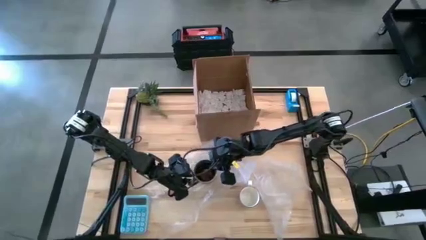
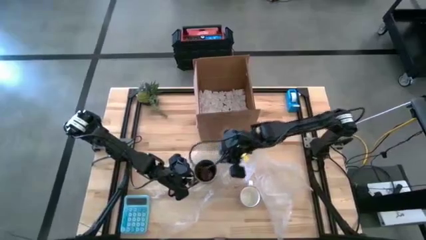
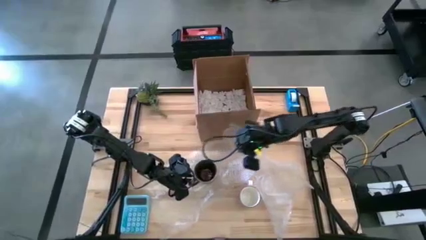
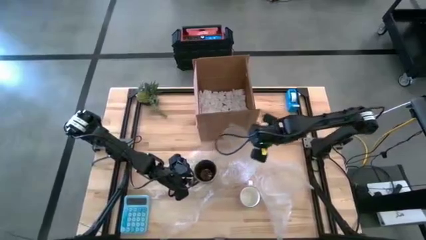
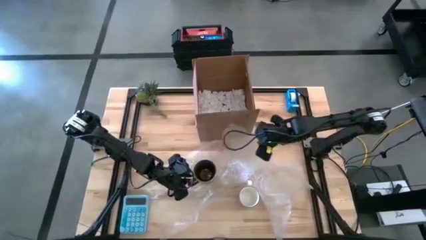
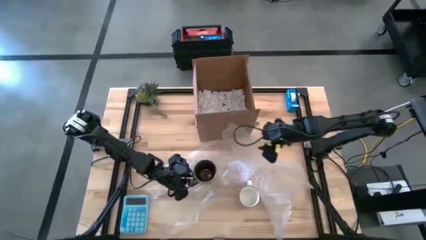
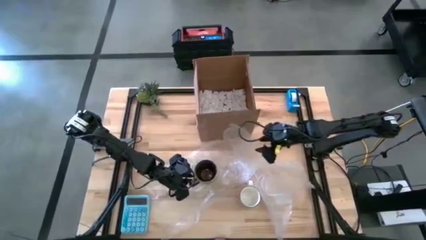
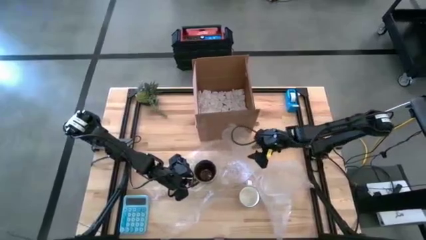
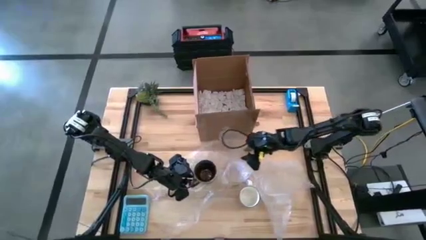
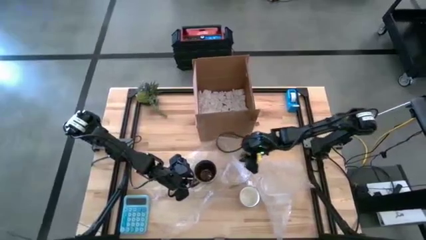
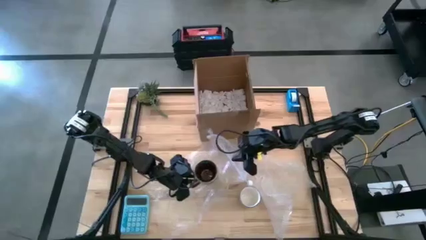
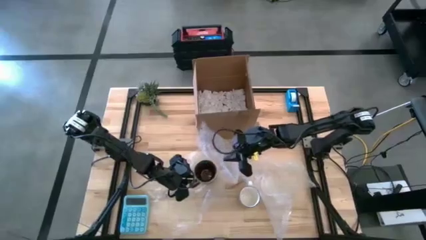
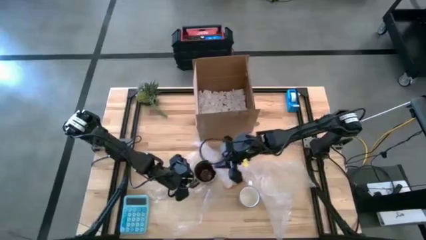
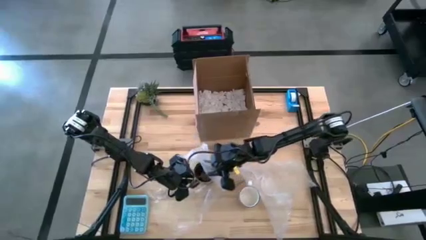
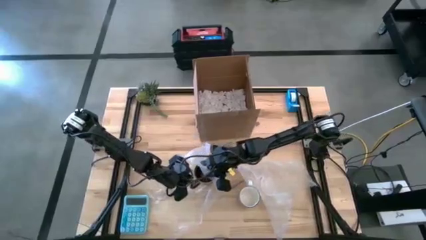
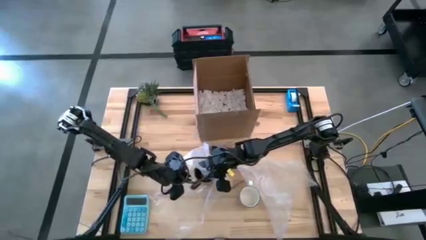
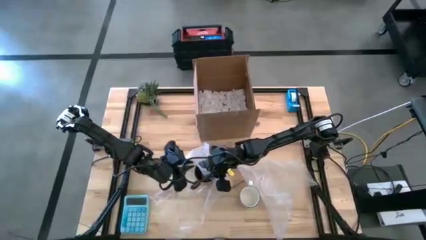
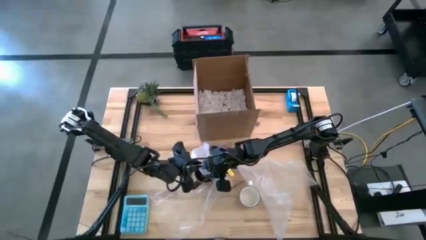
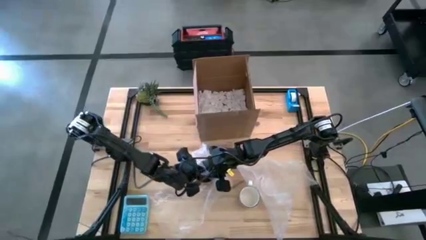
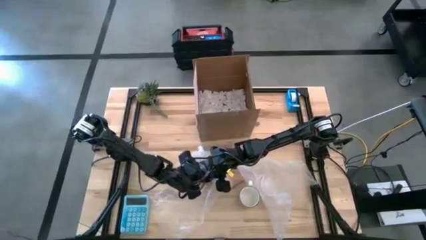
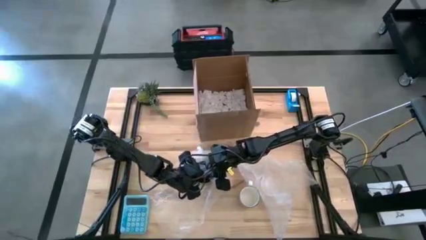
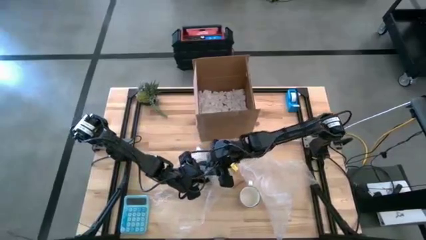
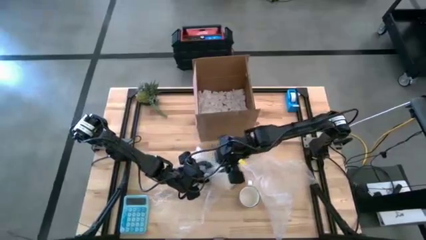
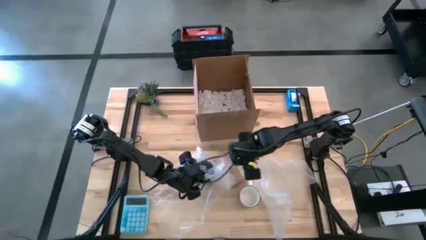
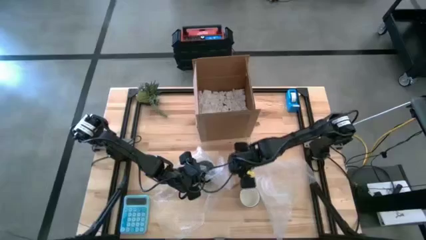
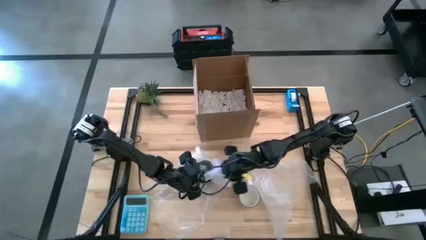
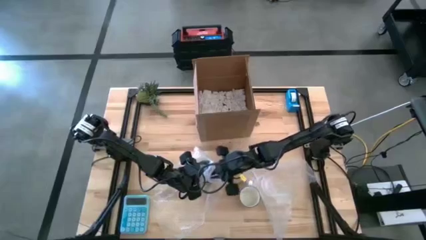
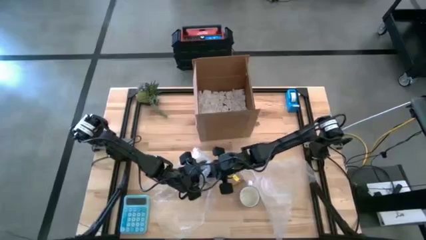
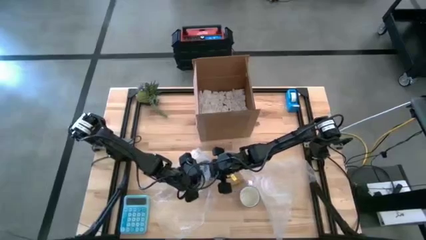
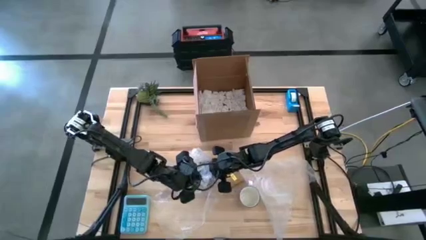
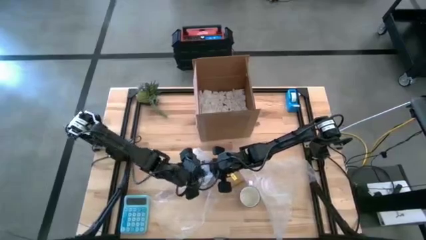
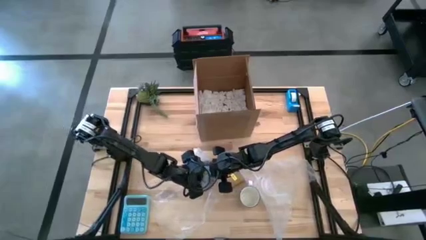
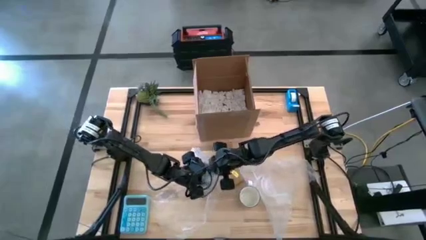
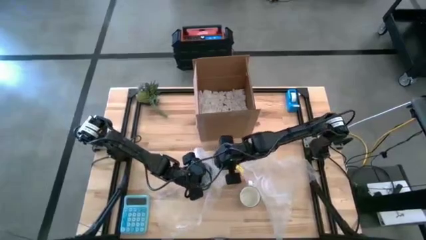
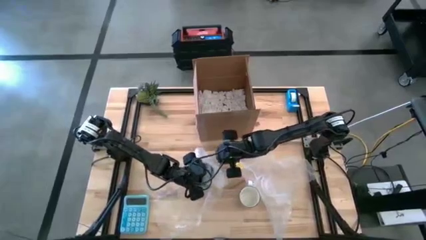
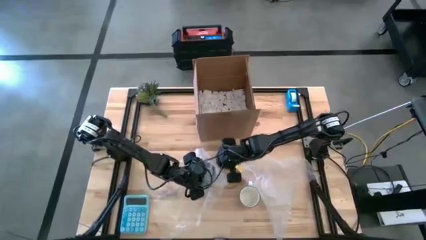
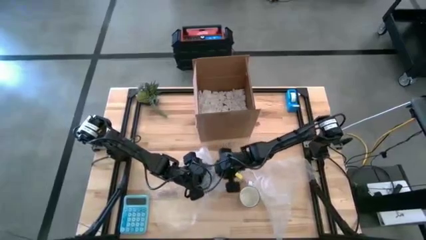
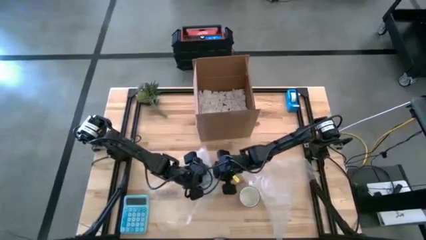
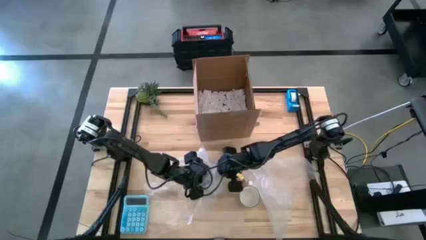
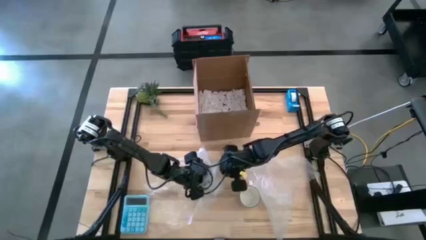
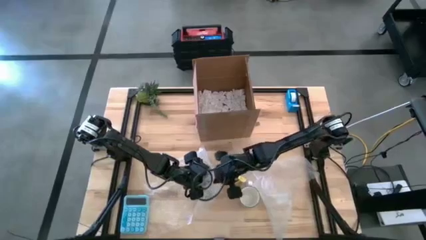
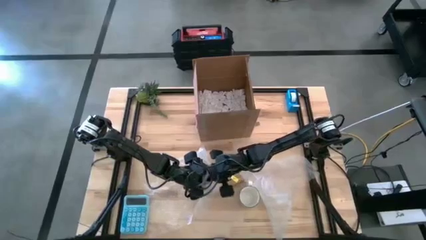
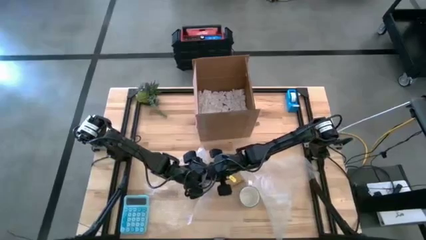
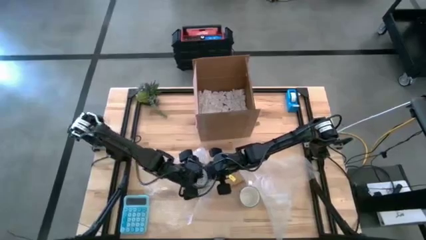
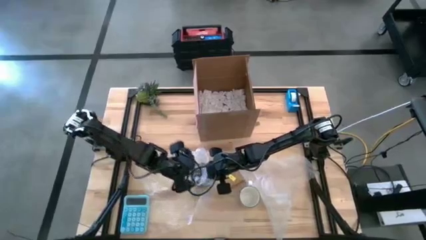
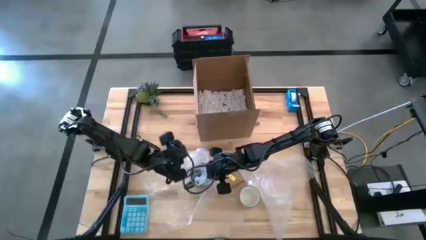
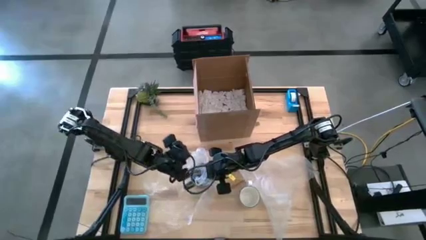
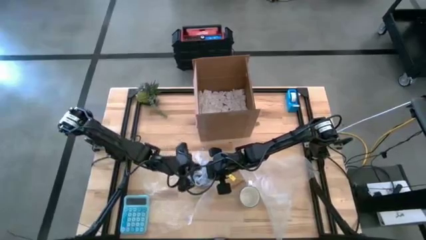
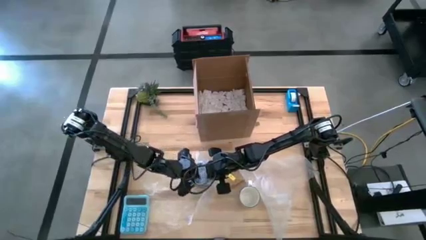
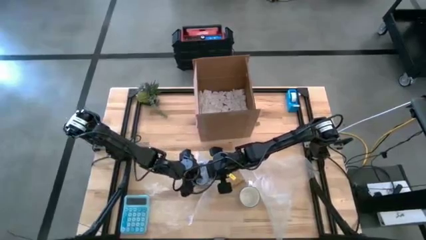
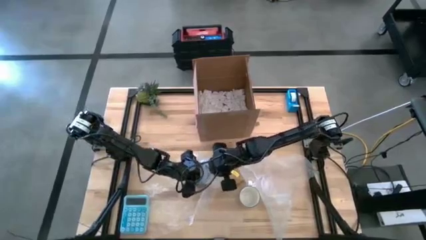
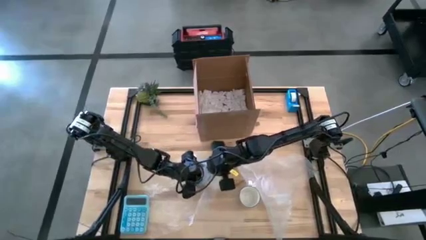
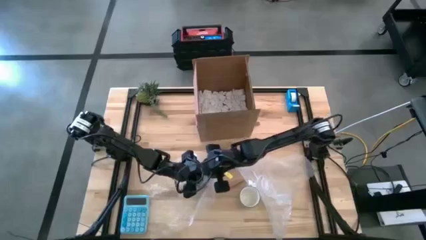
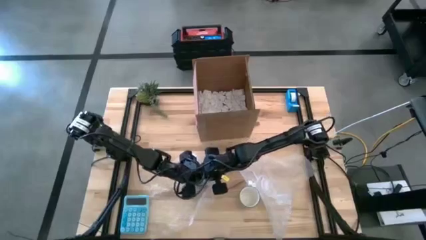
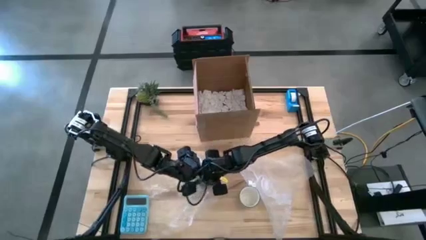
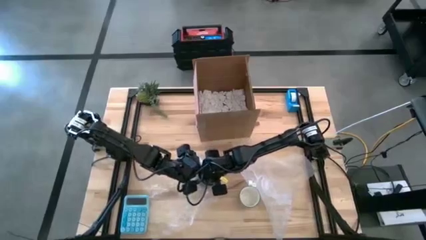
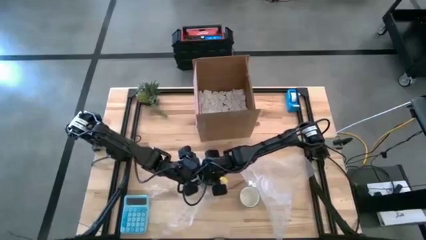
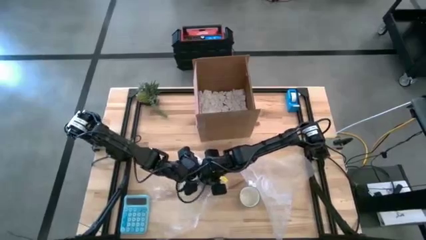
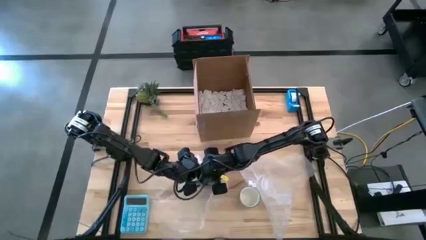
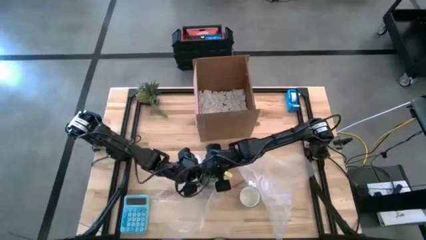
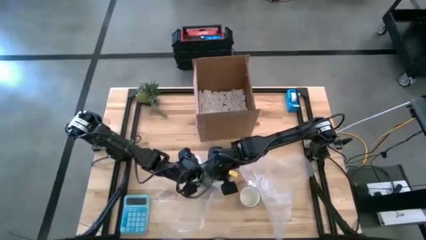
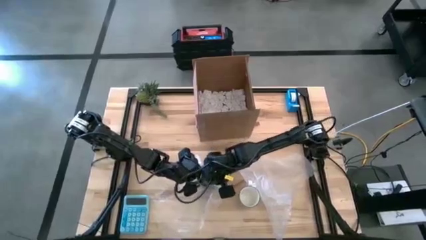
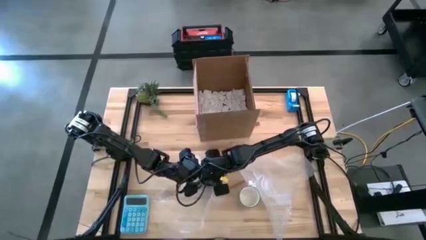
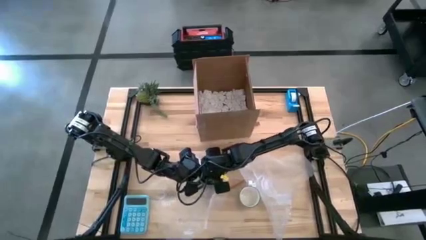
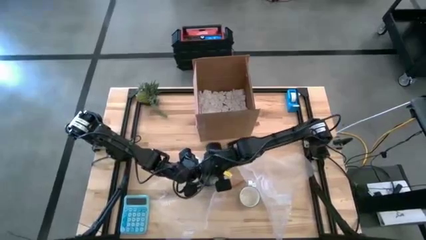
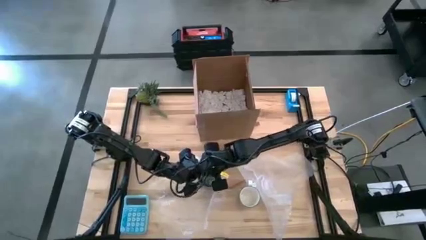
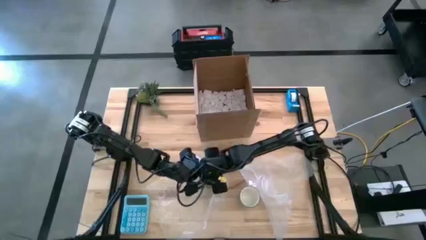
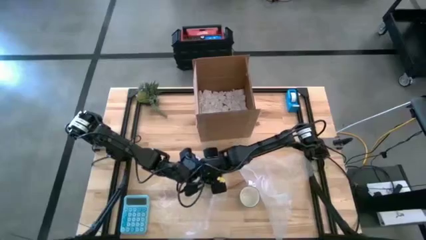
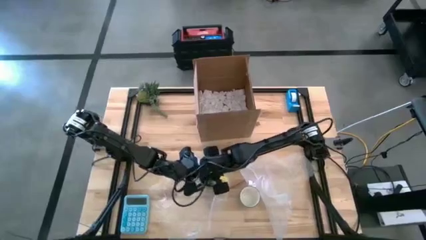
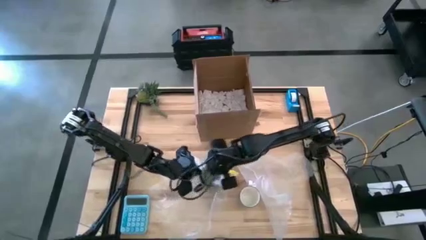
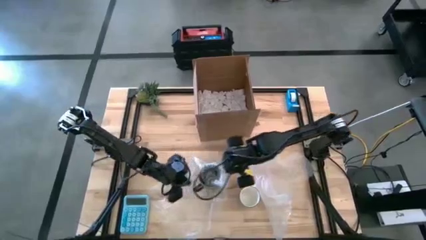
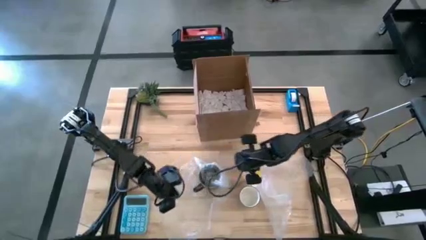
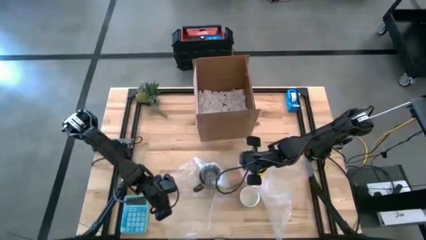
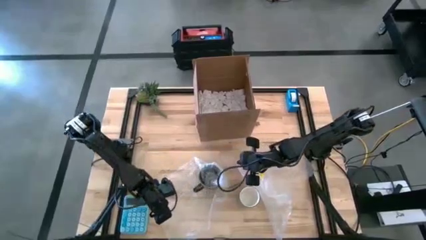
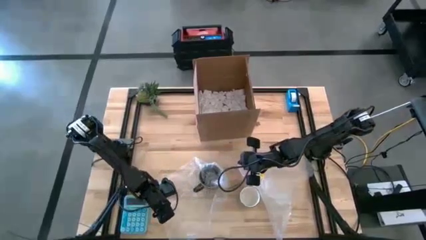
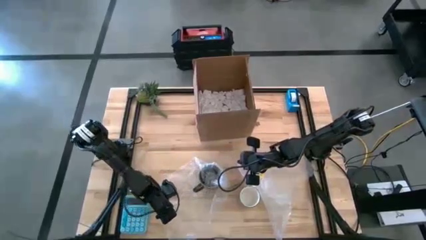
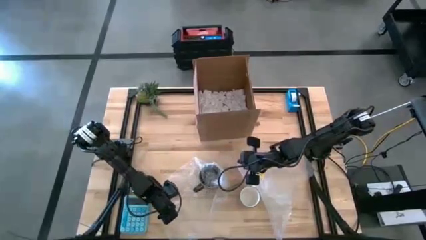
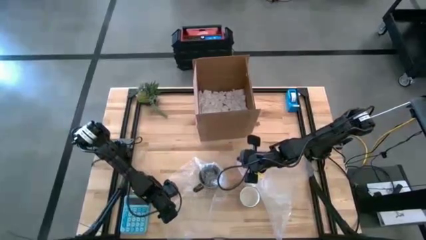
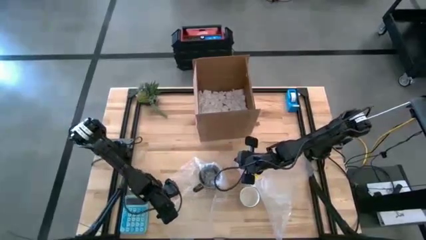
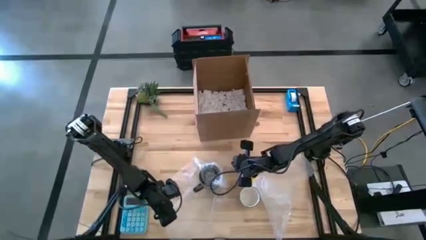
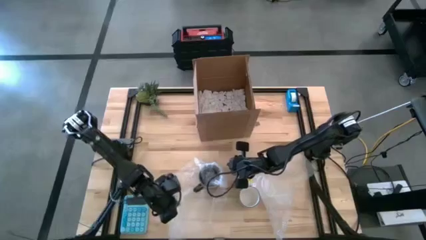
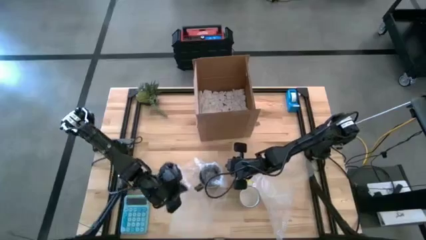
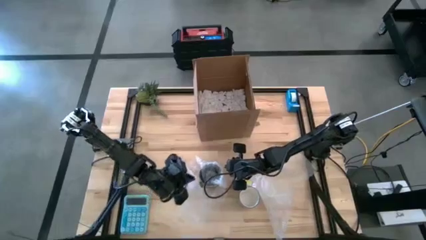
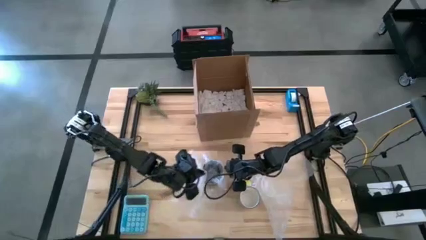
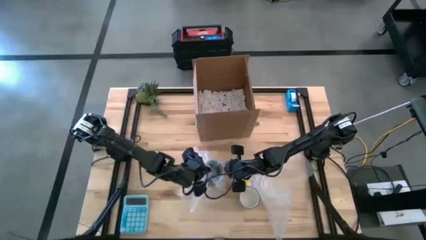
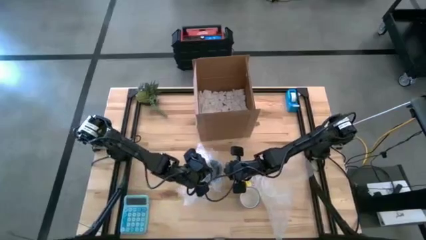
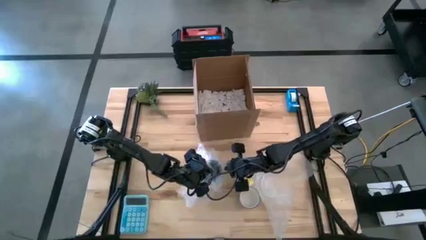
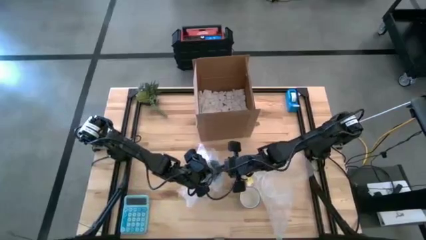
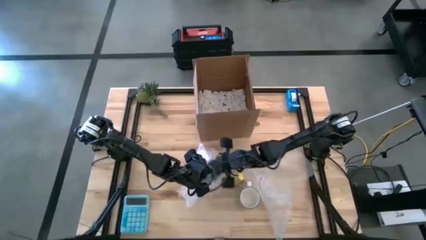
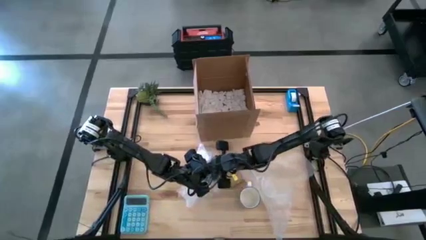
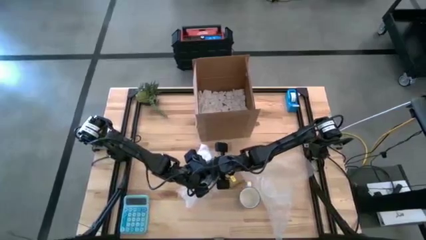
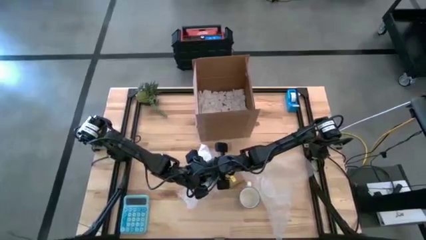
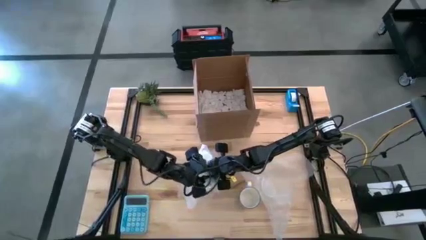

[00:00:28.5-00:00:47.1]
Task: wrap mug
Wrap the green mug with the bubble wrap
